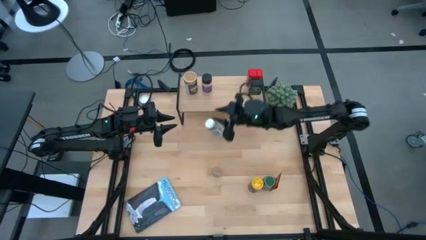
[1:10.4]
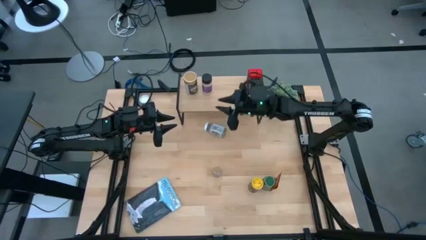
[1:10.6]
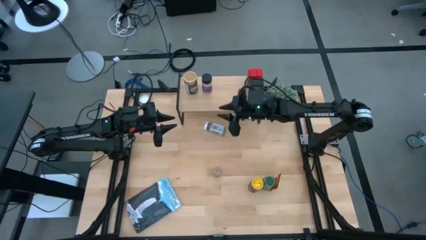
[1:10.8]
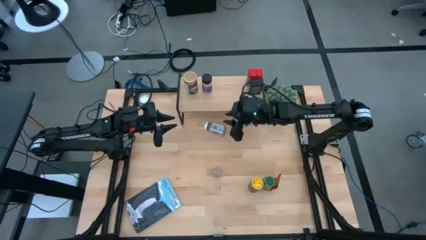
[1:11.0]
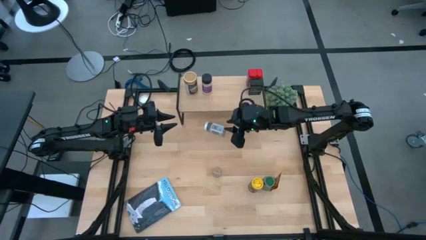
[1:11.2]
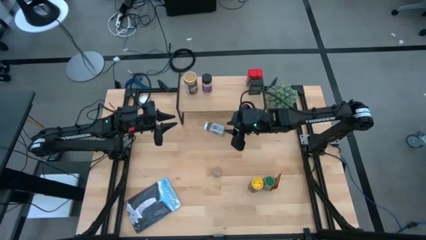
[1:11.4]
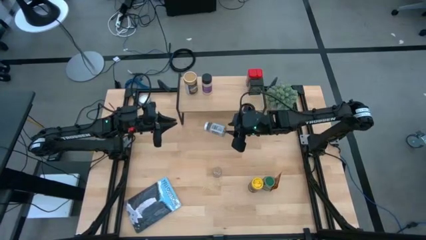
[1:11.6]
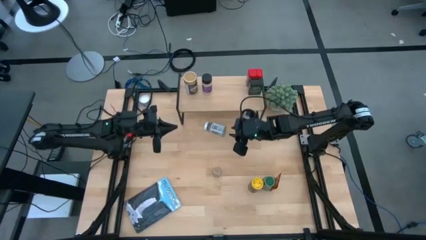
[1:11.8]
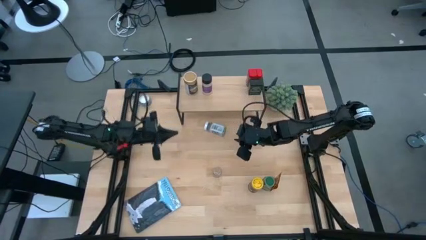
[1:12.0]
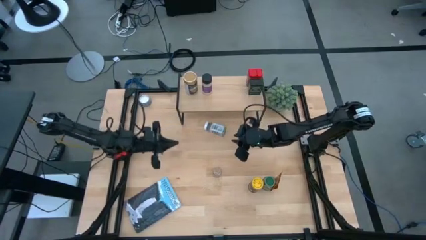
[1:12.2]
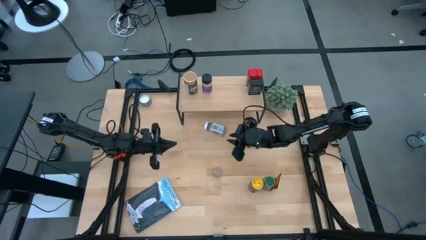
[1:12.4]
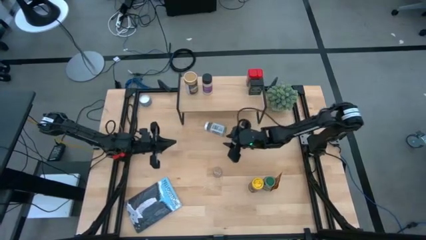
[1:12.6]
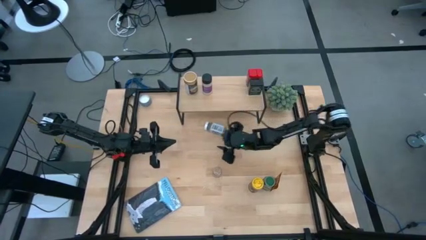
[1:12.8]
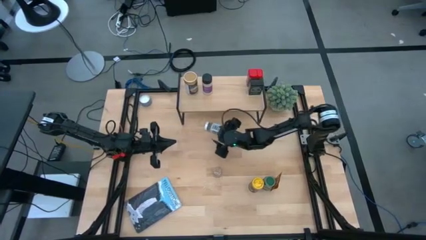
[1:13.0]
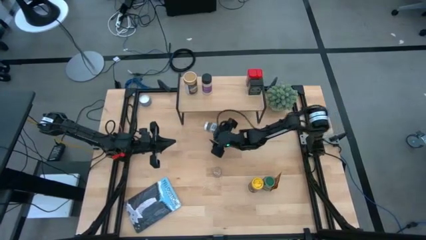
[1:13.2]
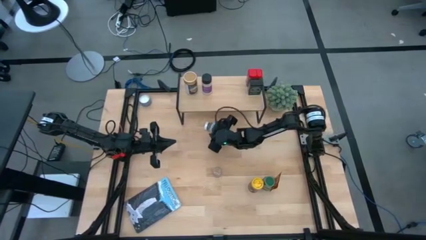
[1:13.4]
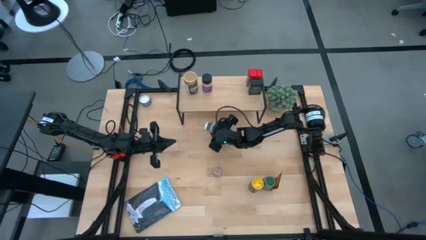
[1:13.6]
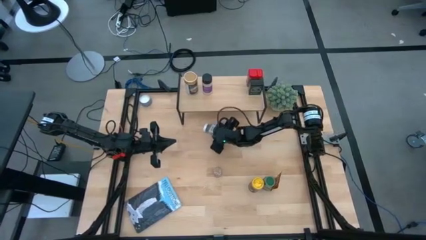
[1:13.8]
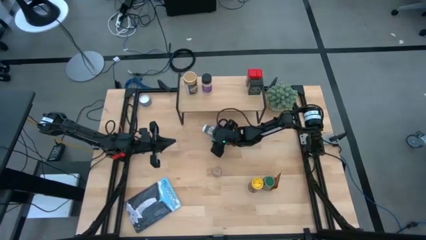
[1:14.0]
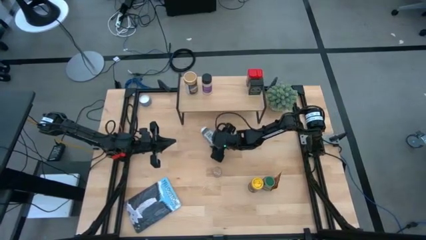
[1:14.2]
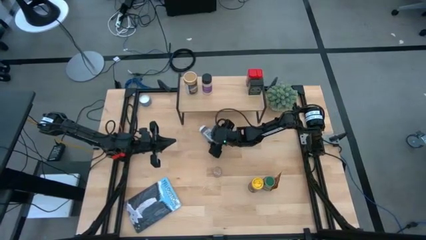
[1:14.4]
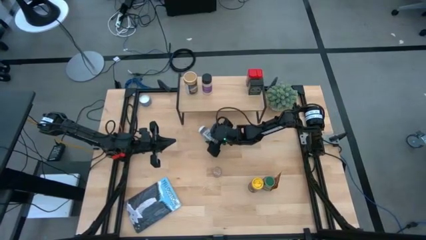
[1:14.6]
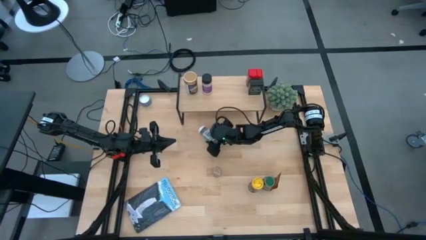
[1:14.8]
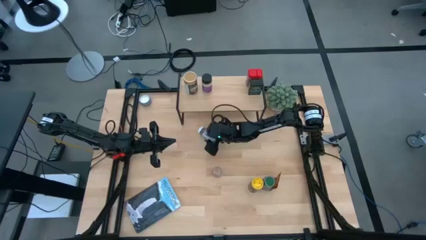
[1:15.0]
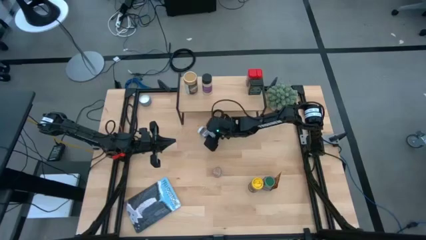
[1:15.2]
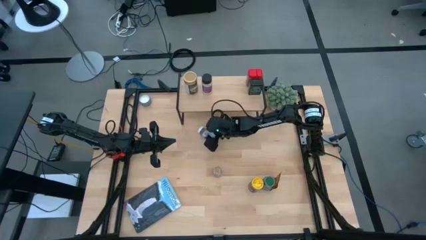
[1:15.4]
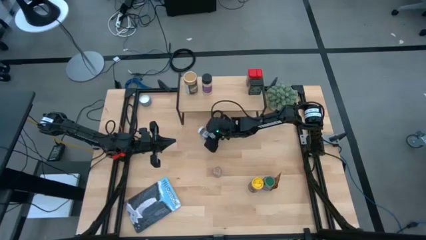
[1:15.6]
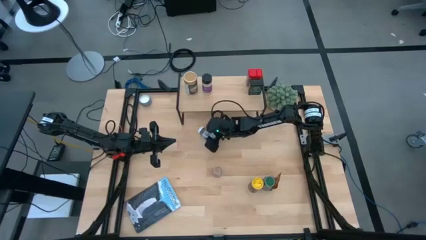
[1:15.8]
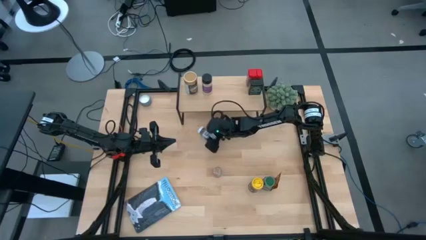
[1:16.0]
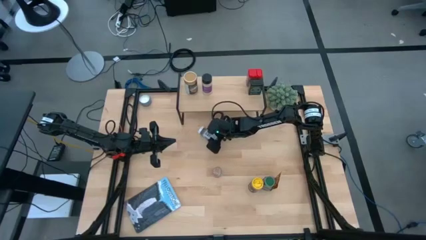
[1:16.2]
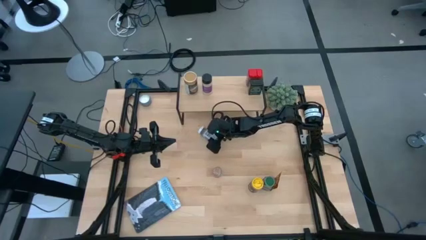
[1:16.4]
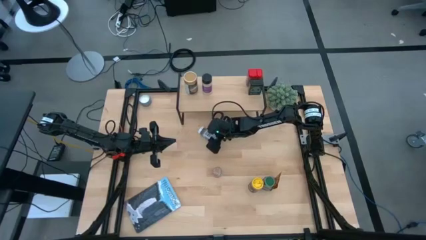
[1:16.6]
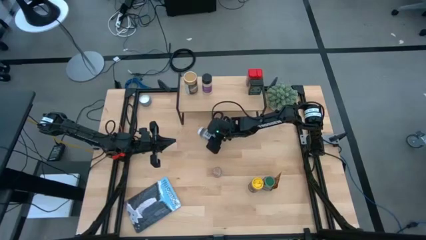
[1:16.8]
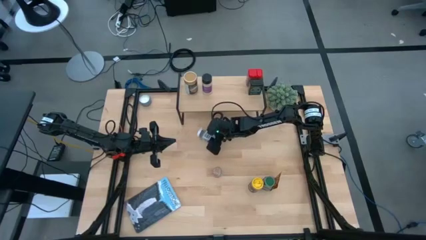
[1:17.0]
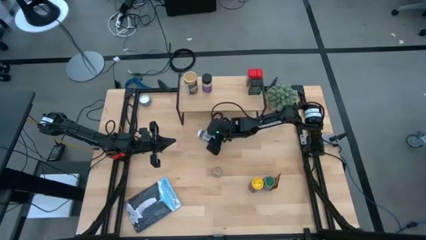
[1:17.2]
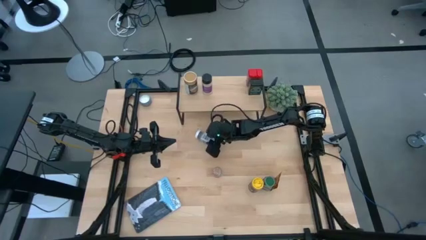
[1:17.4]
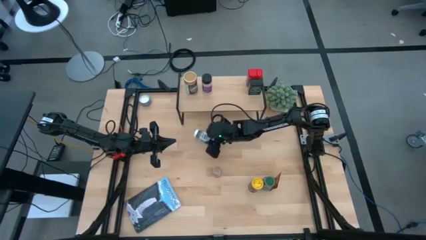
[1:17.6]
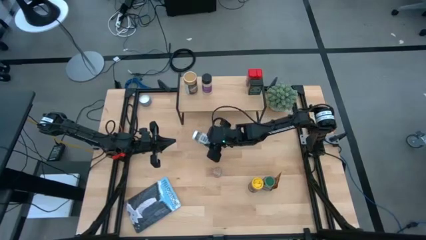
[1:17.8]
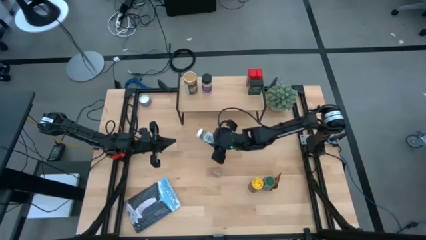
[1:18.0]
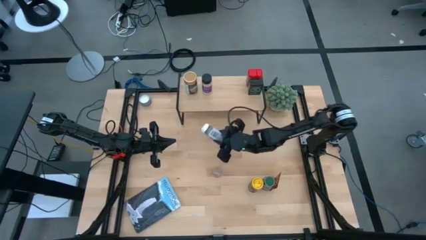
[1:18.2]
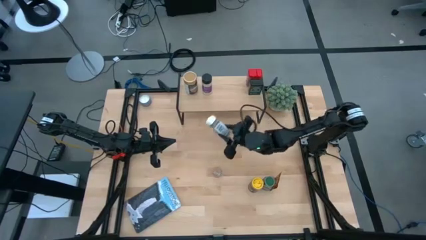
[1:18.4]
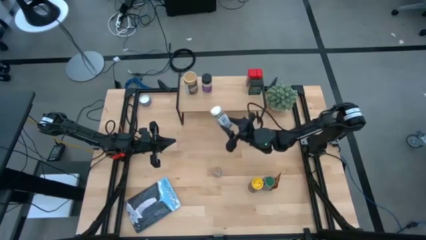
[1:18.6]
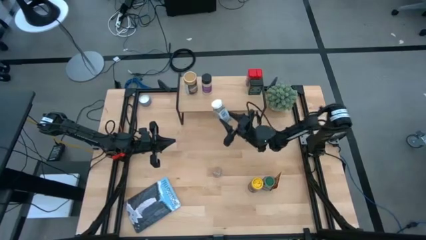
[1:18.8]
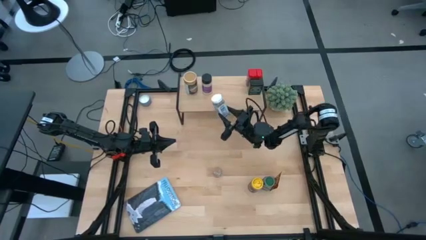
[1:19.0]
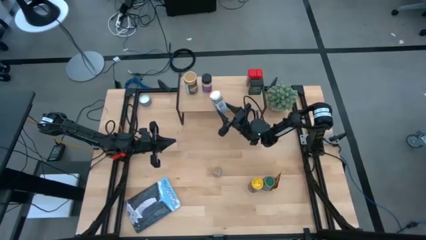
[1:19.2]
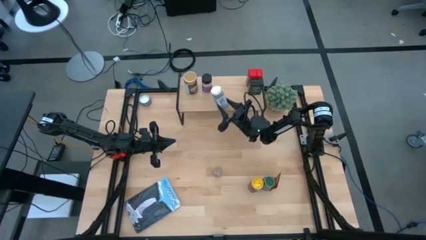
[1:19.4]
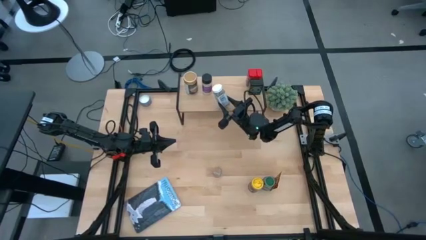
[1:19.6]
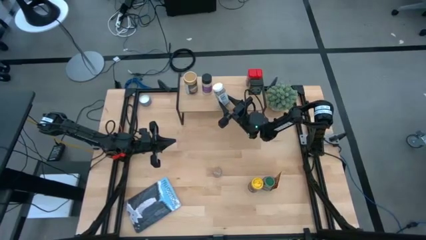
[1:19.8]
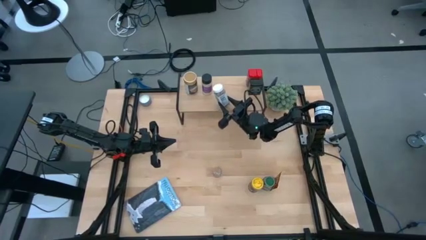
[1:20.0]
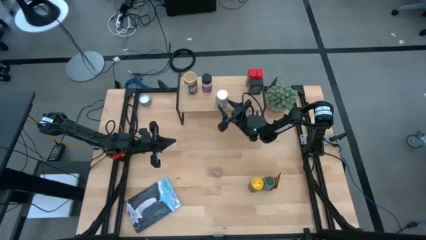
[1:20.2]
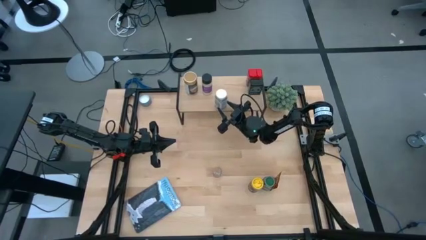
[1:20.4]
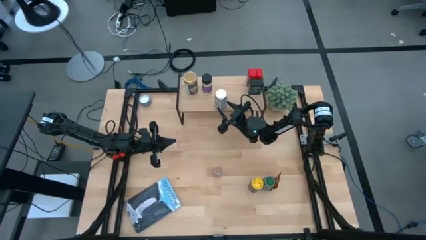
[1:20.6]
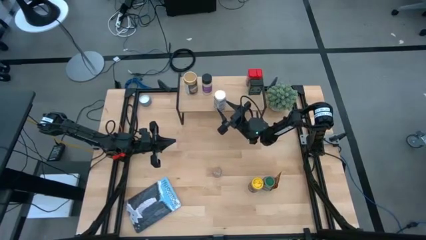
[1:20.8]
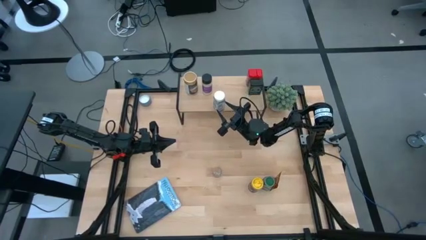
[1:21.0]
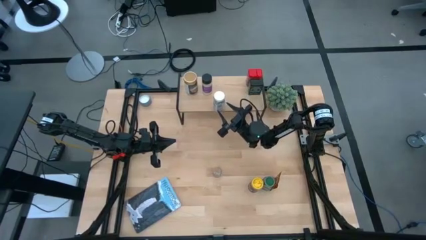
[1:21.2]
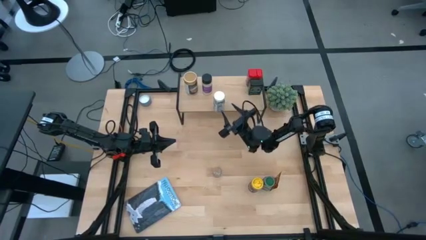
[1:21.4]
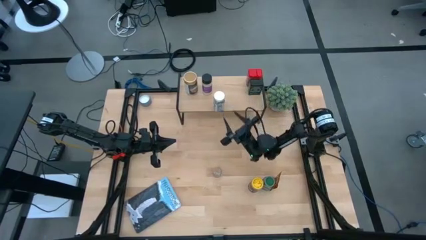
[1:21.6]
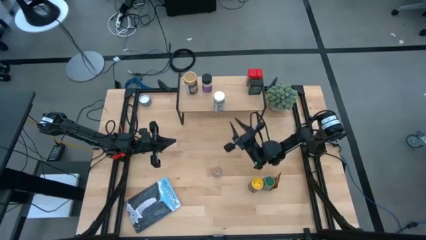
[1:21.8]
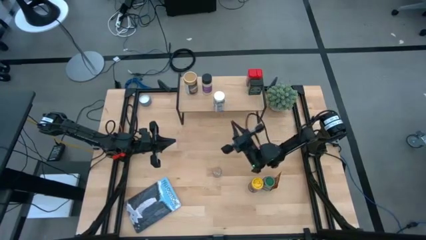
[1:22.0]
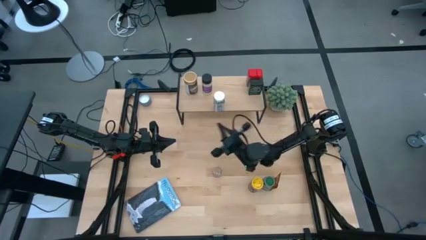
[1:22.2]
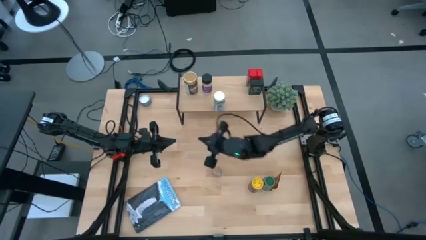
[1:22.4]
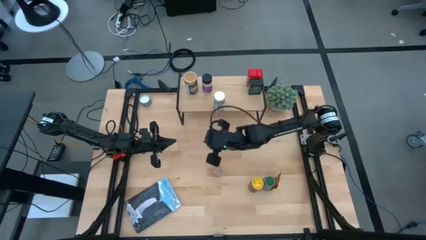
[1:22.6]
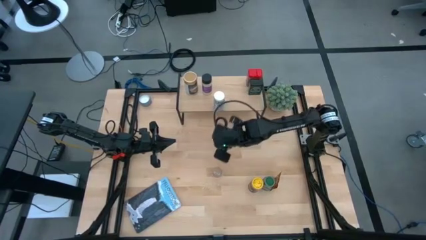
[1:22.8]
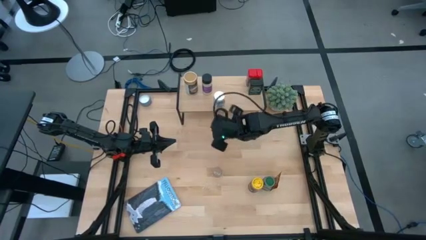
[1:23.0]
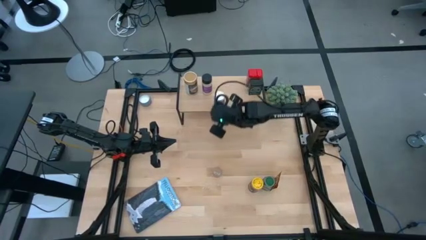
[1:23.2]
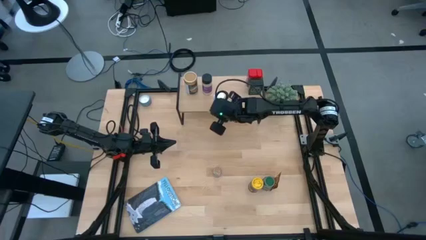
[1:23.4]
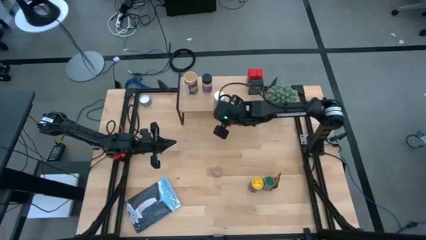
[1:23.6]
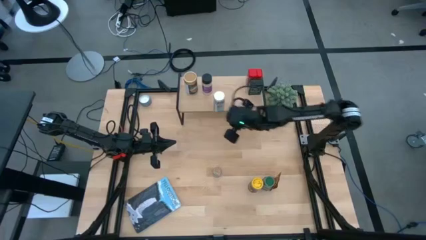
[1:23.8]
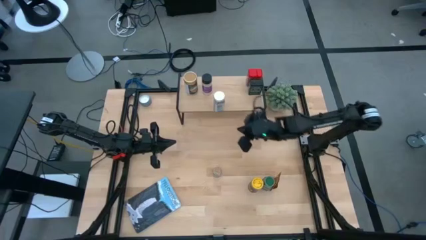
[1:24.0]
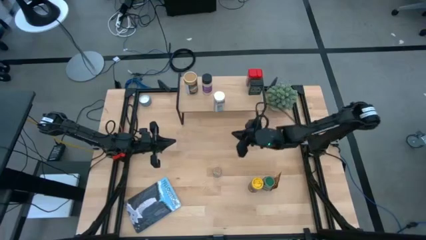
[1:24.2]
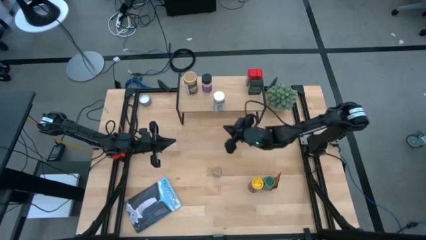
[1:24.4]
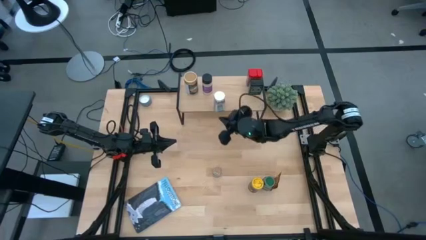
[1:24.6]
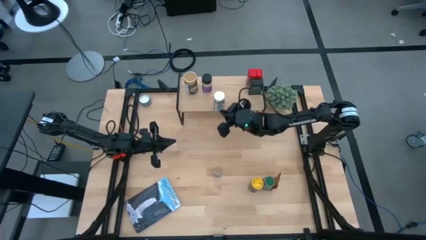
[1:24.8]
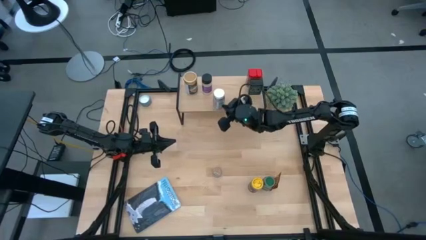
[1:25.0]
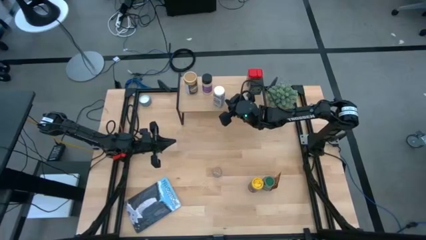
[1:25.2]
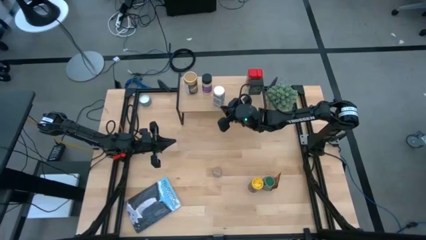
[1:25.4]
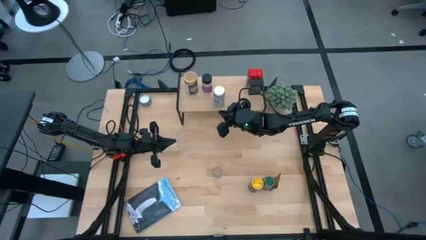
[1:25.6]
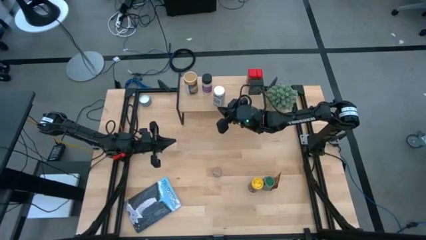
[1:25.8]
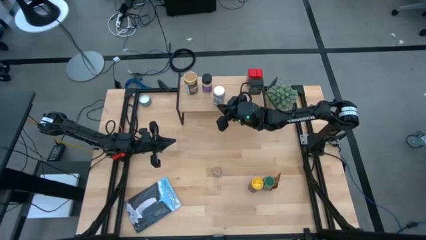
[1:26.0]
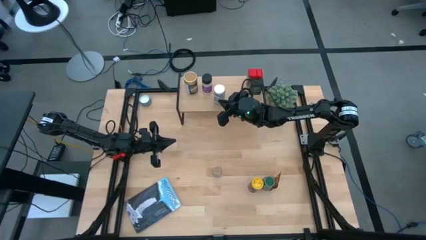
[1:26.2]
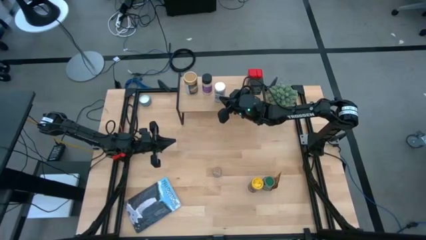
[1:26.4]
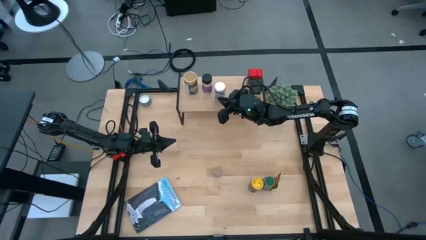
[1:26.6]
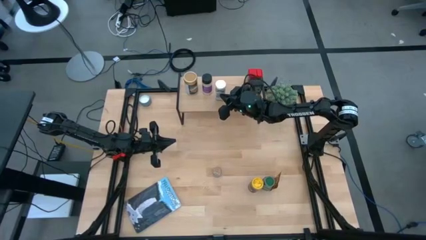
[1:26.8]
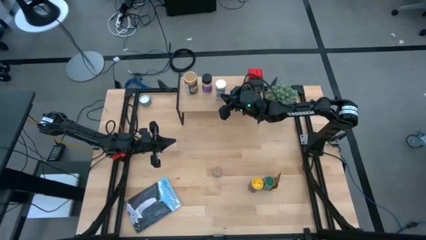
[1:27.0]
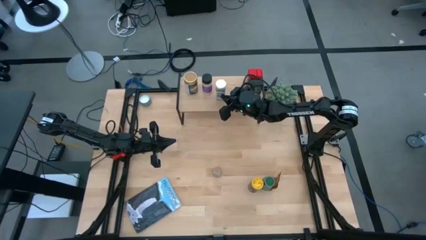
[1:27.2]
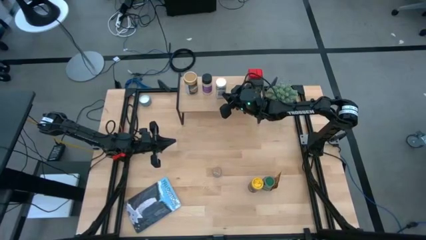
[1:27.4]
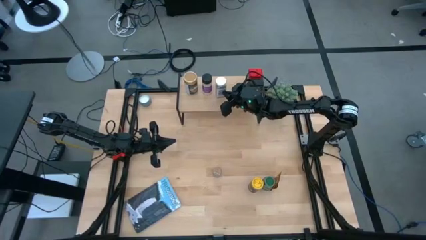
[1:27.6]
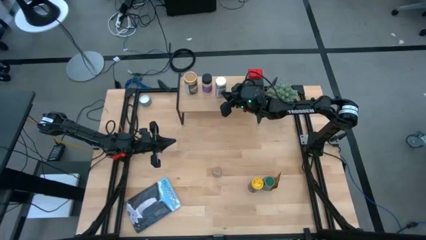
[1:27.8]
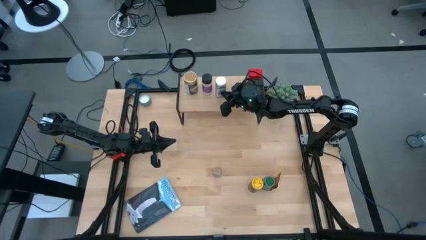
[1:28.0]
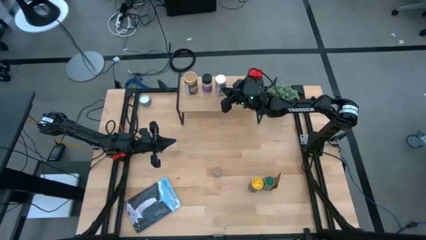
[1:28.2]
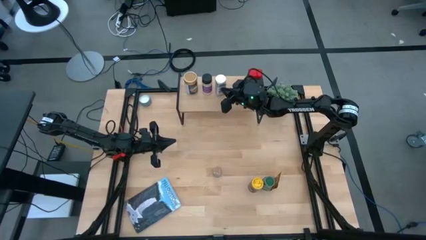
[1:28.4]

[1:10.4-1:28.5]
Task: Shelf spices
Put the white seasoning bottle on the shelf
